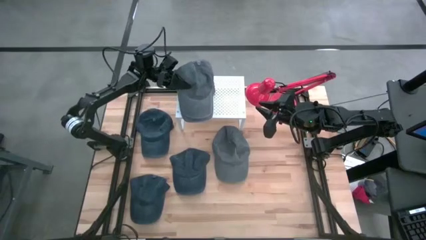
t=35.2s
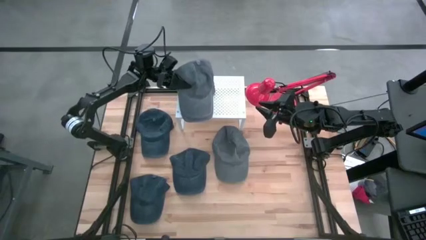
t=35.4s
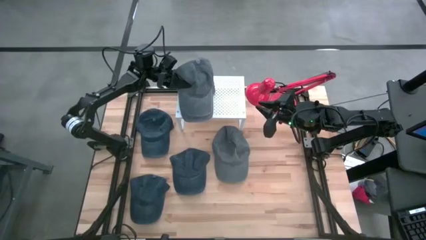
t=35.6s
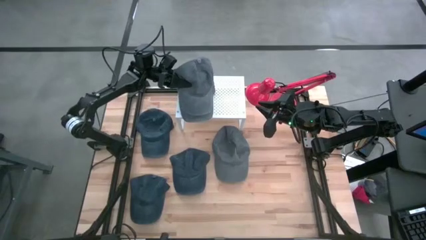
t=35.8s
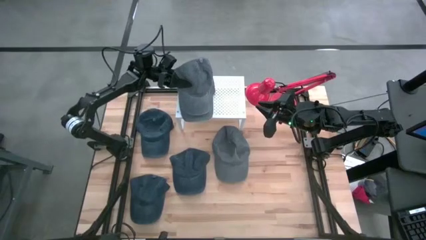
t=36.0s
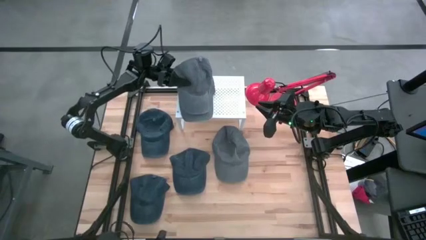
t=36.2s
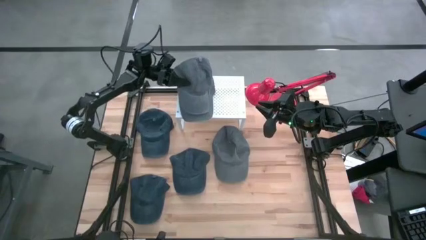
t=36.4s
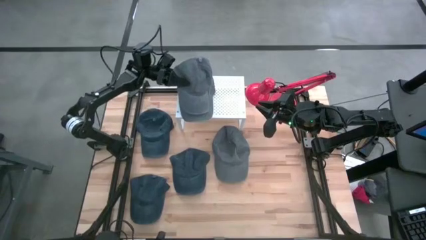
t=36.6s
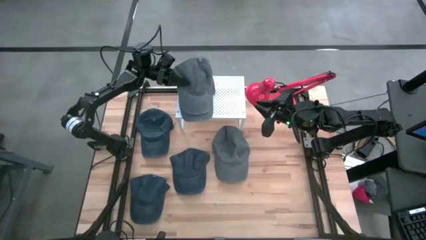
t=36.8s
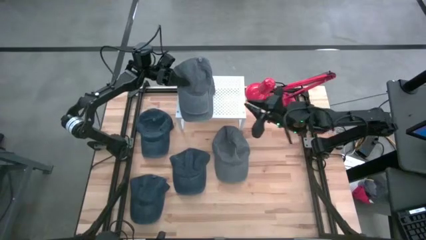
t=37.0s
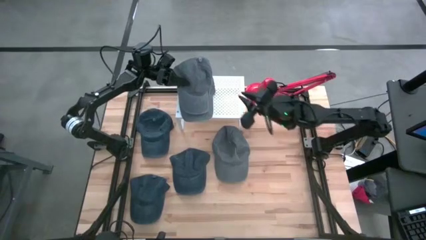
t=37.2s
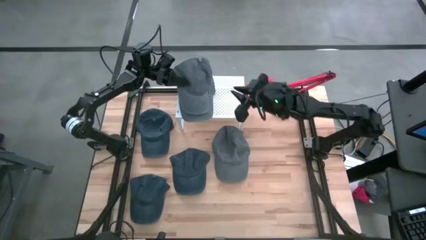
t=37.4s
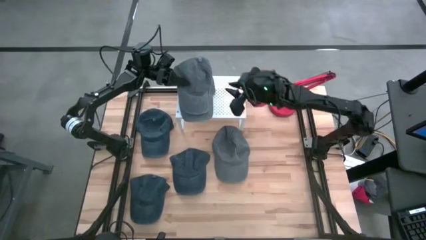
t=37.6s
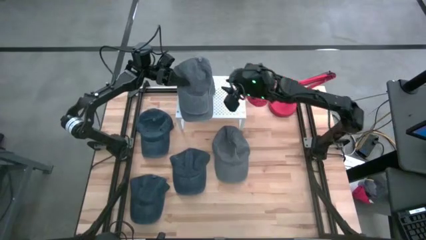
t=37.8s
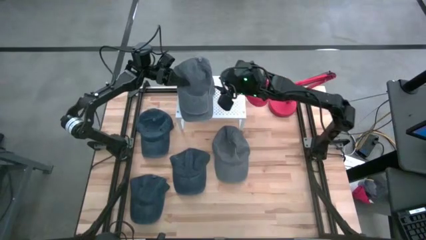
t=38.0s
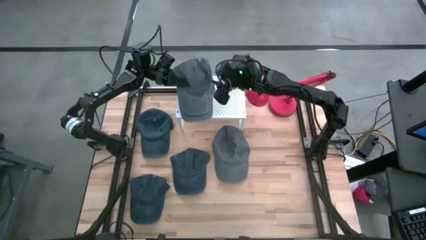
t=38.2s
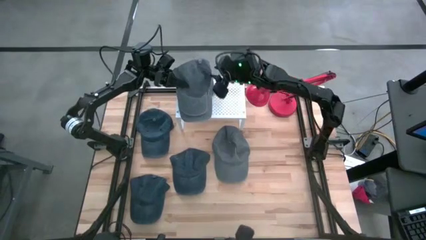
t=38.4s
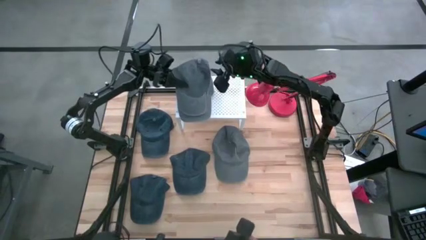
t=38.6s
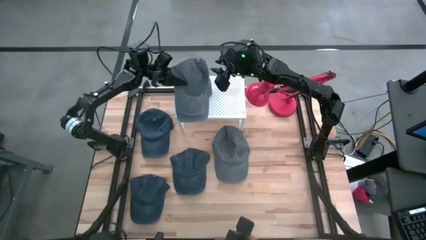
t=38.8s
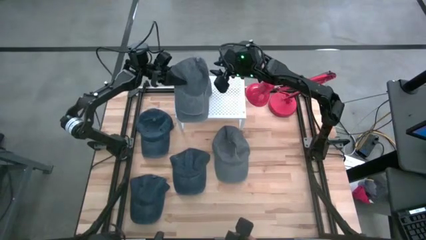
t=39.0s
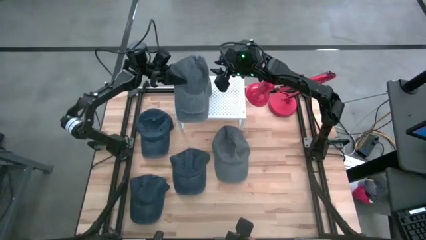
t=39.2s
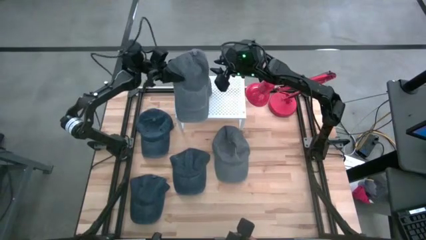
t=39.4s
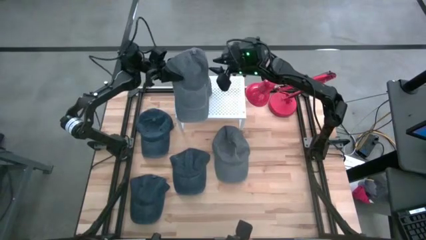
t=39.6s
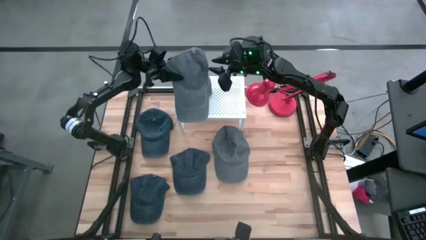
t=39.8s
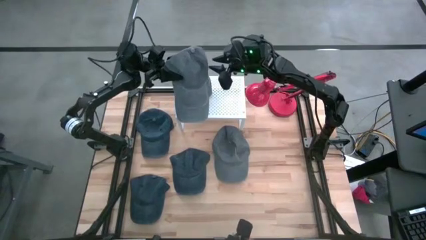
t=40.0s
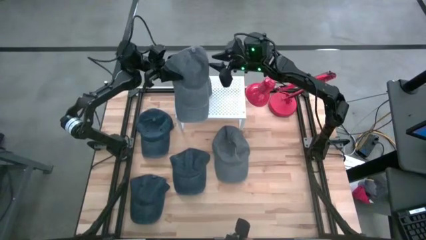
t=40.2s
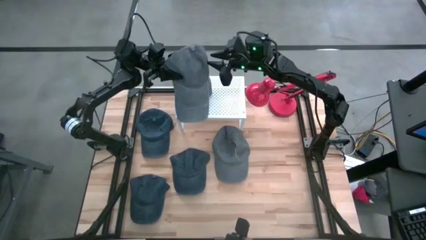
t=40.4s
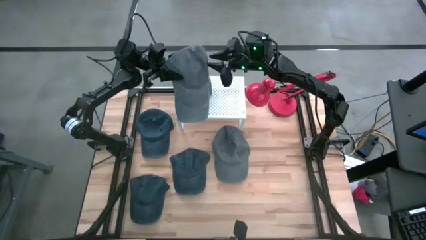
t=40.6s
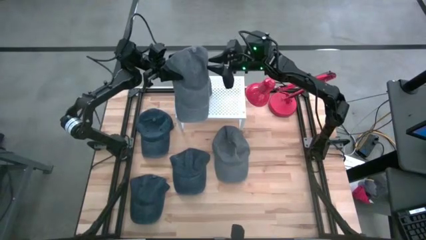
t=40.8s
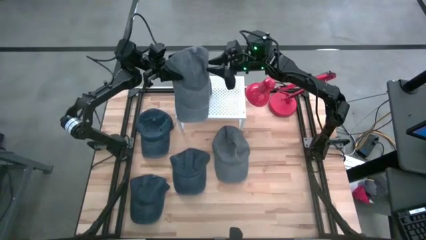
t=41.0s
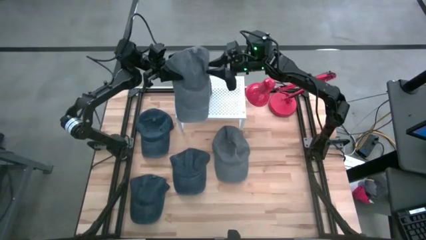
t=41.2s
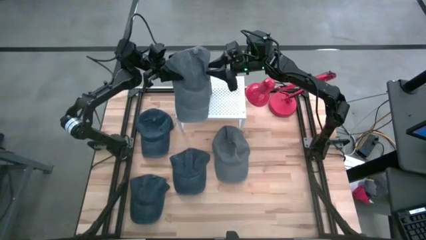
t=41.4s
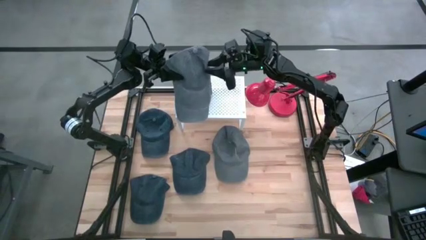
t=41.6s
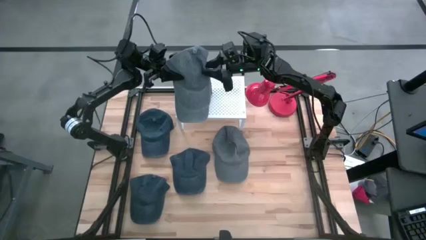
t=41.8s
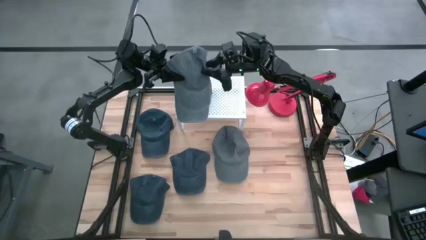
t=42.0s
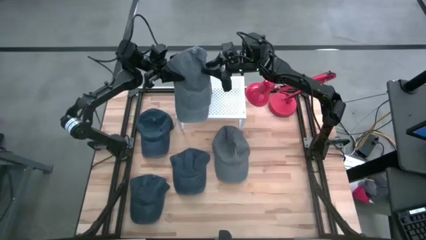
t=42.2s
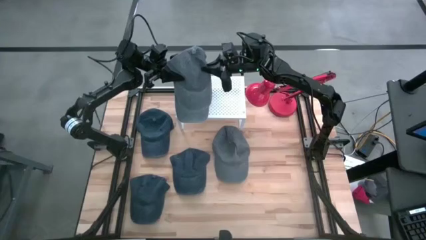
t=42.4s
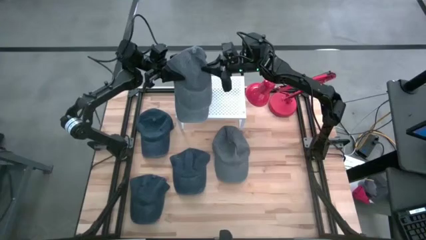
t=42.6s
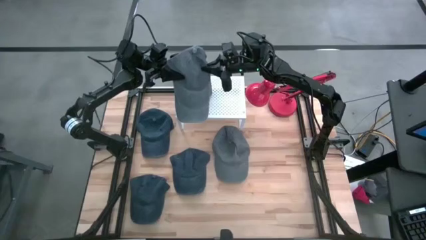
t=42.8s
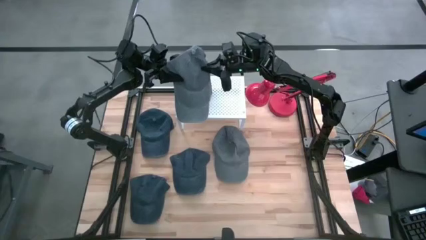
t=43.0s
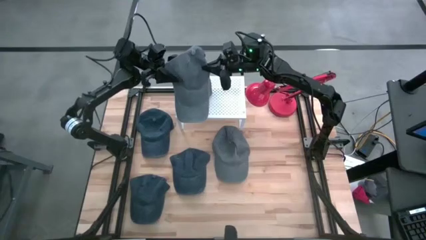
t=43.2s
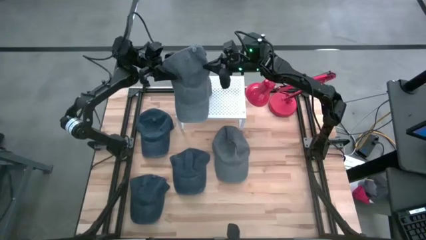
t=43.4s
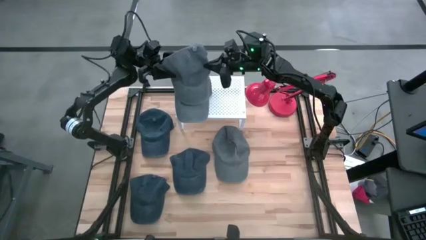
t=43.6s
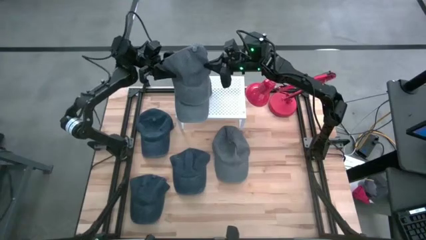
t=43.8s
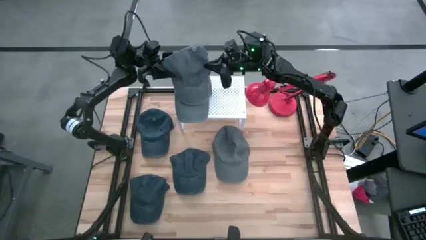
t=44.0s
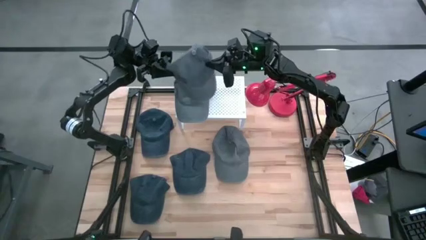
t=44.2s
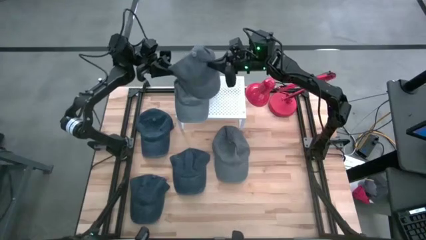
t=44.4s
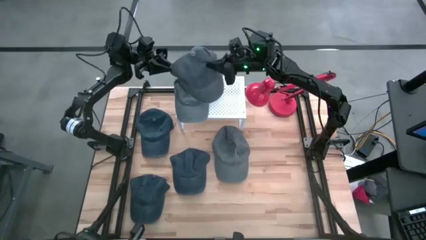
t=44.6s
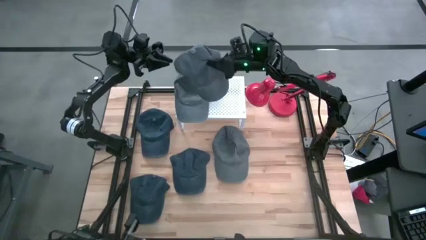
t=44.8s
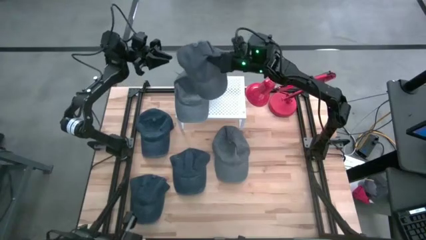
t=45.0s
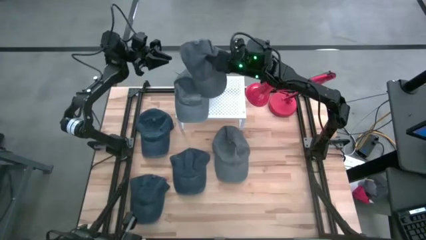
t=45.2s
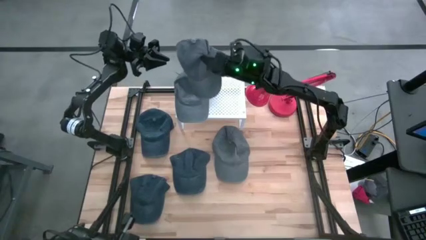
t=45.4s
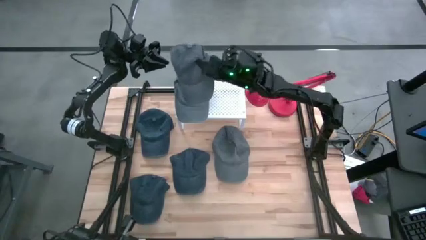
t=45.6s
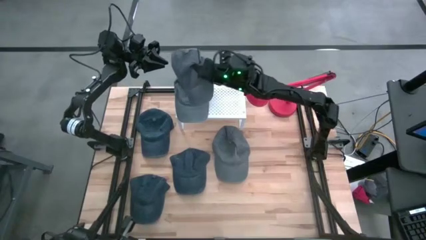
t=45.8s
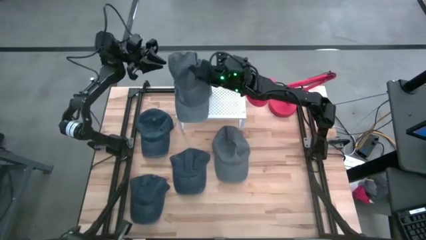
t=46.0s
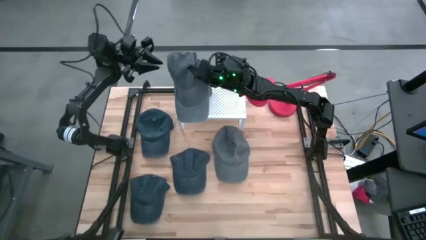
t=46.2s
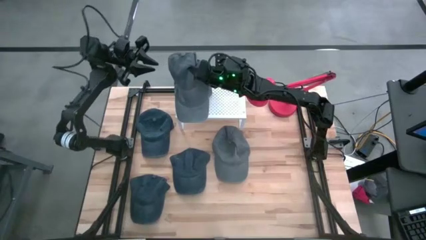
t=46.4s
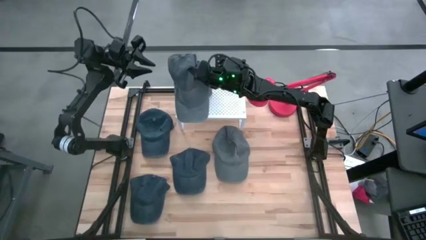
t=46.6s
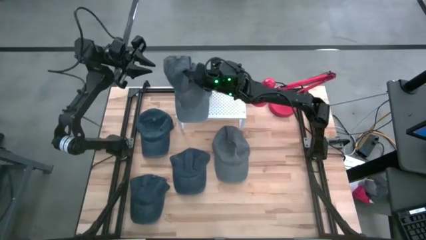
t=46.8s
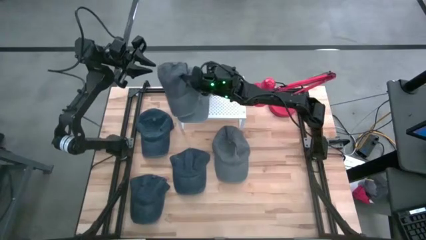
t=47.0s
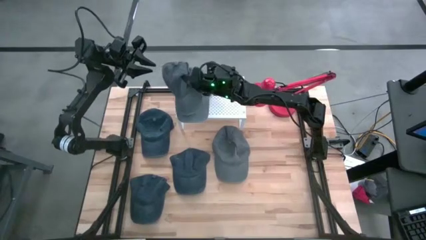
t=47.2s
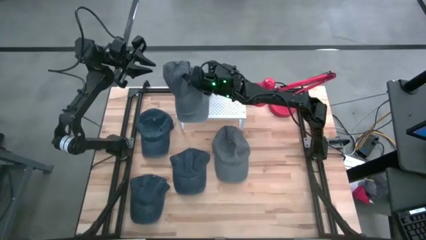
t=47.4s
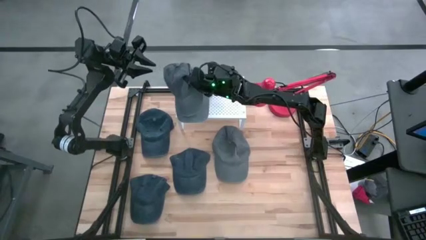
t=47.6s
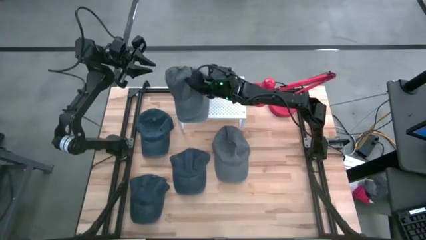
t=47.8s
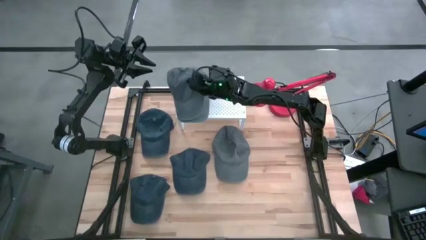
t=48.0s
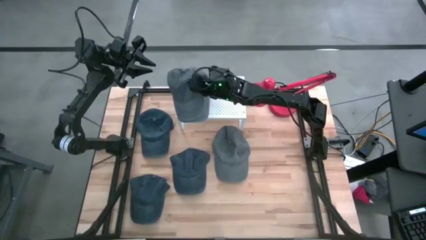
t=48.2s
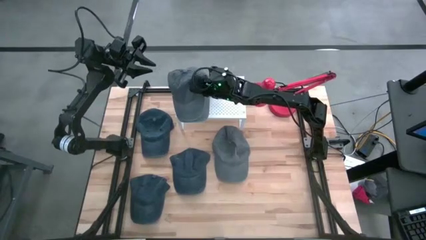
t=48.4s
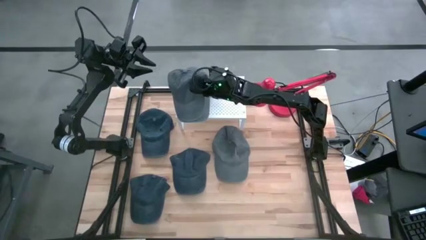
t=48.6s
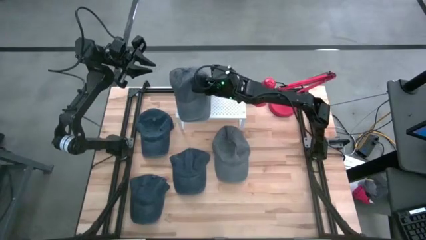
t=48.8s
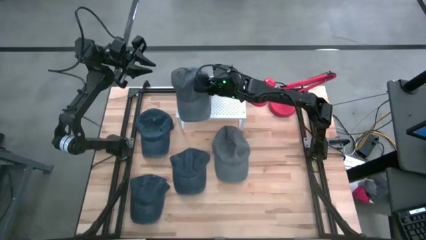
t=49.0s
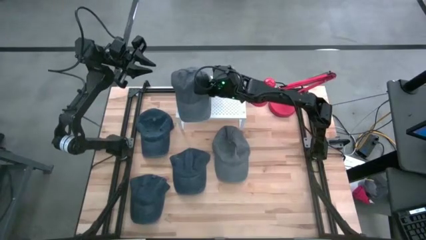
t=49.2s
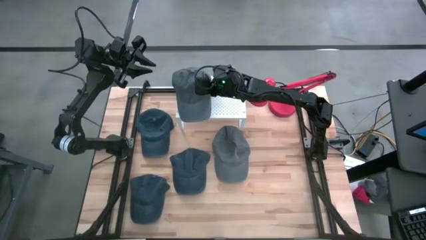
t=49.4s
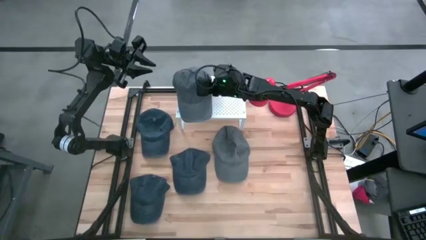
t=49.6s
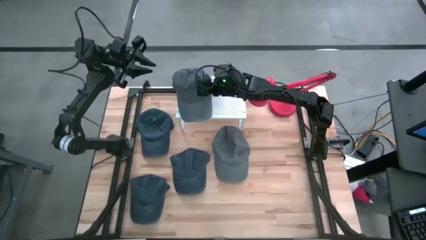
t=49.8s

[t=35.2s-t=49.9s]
Task: Pick & Place hat
Stack the bottom gray cap on the gray cap on the shelf
